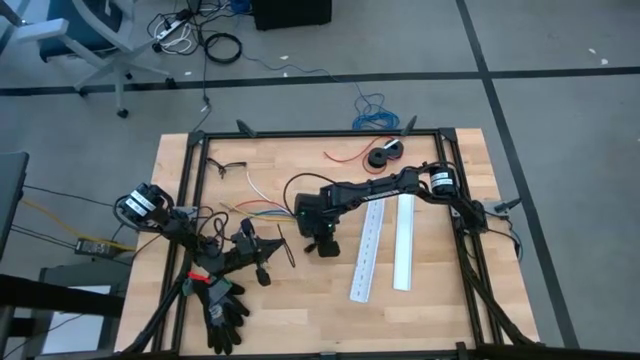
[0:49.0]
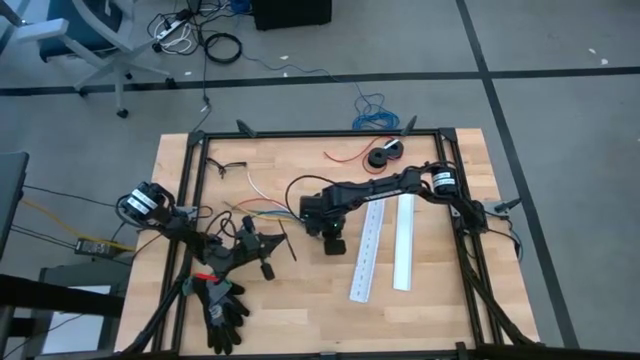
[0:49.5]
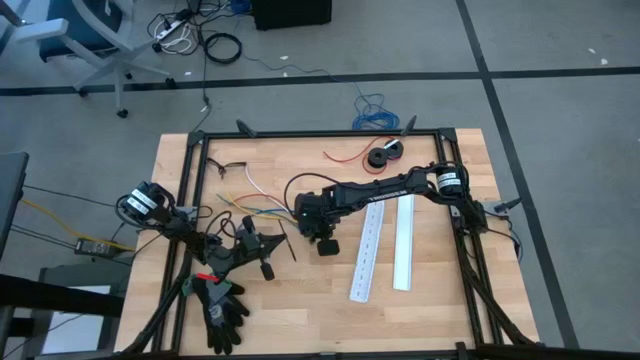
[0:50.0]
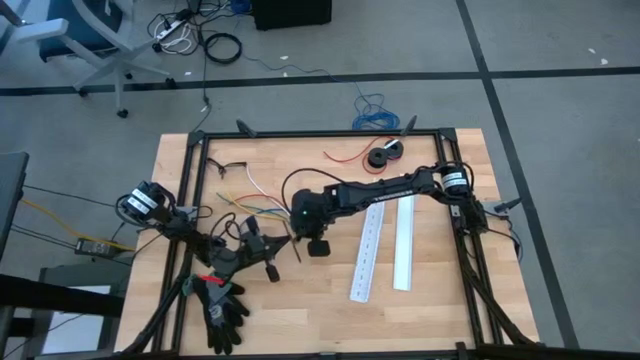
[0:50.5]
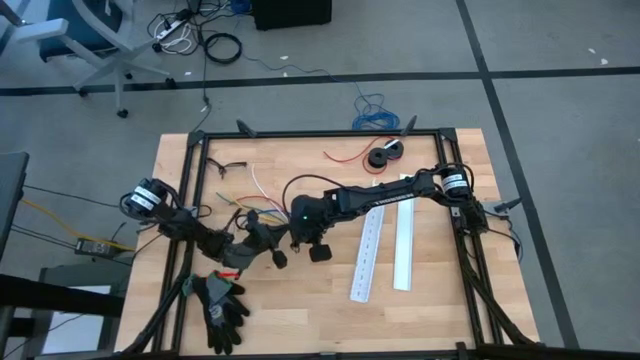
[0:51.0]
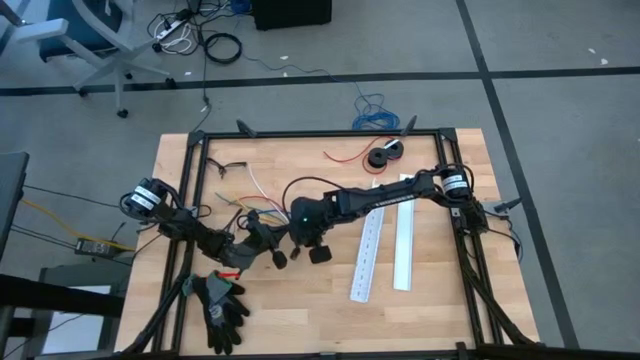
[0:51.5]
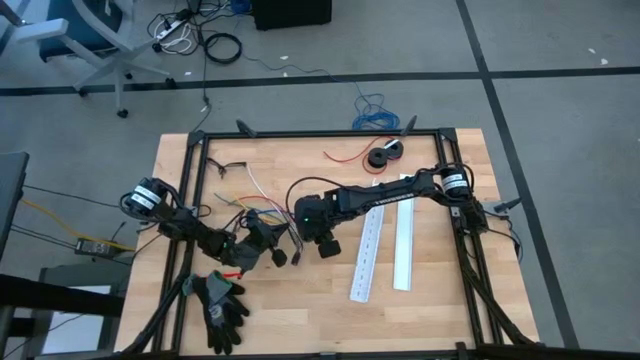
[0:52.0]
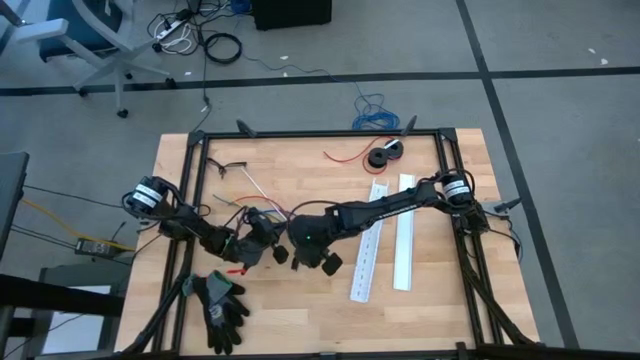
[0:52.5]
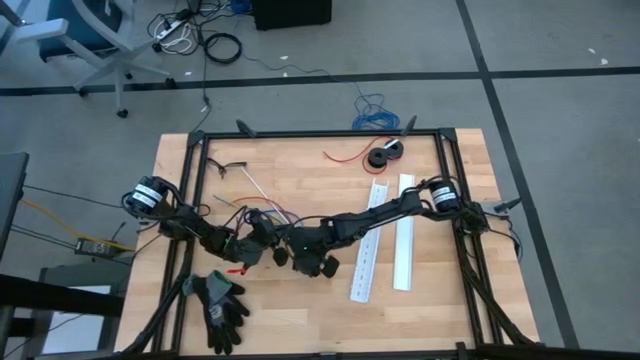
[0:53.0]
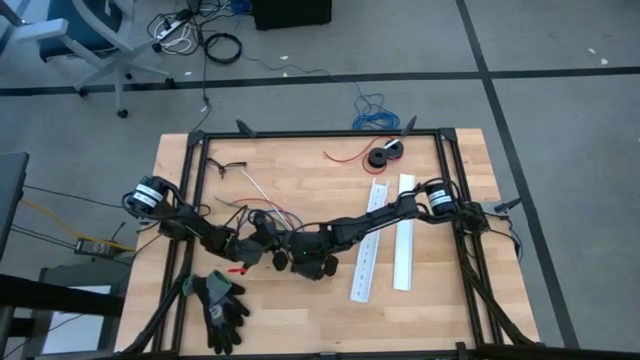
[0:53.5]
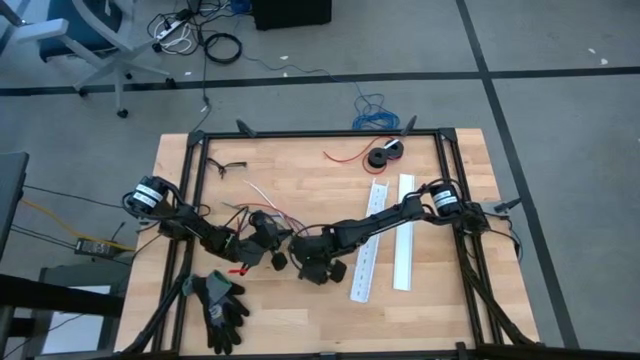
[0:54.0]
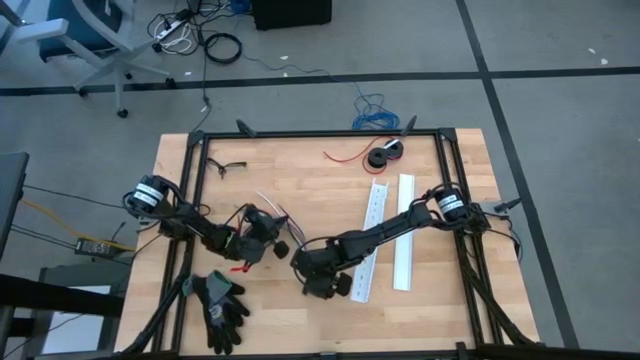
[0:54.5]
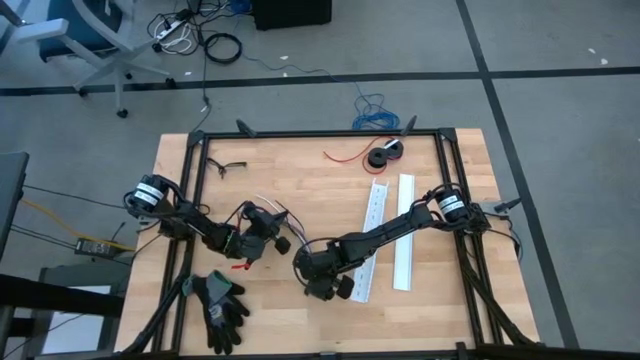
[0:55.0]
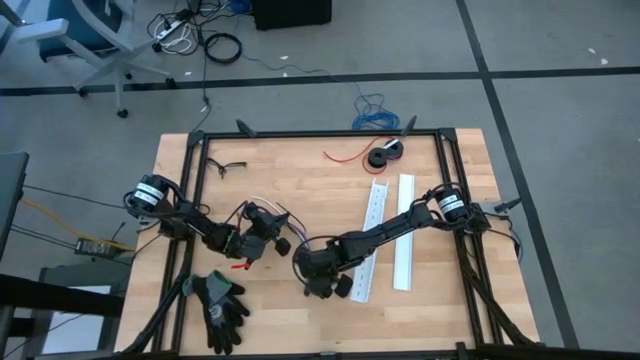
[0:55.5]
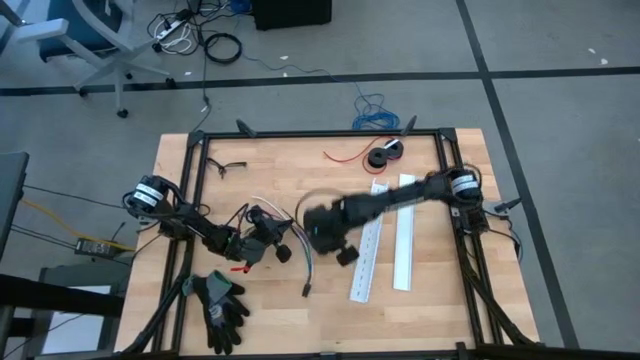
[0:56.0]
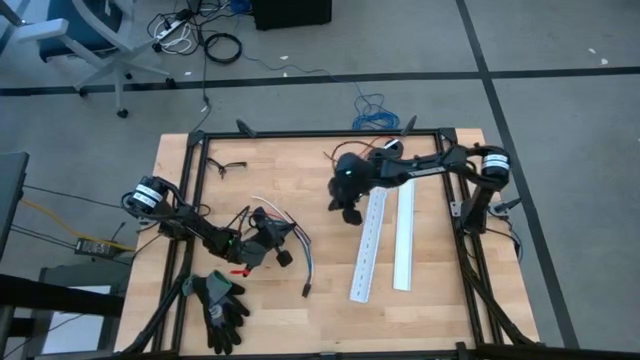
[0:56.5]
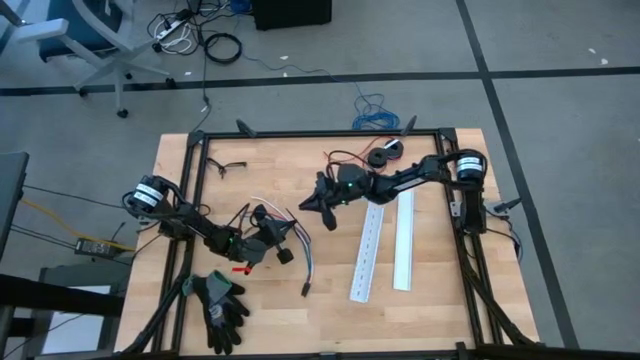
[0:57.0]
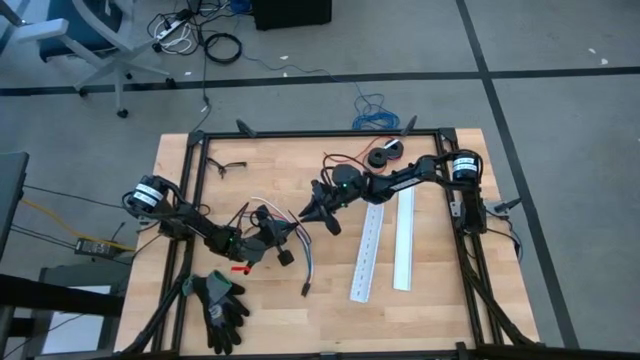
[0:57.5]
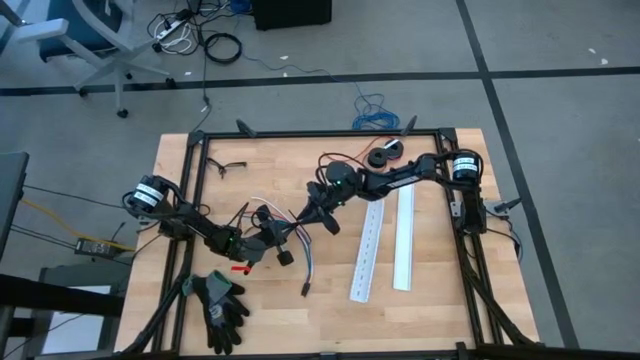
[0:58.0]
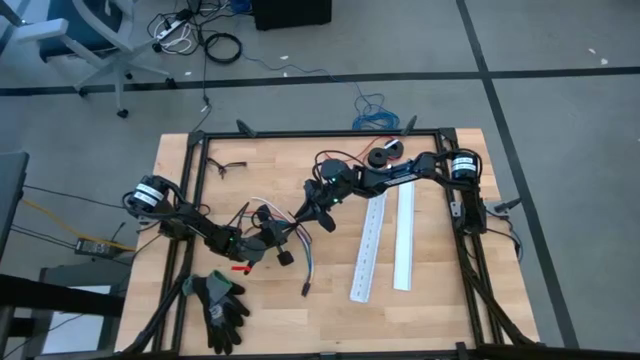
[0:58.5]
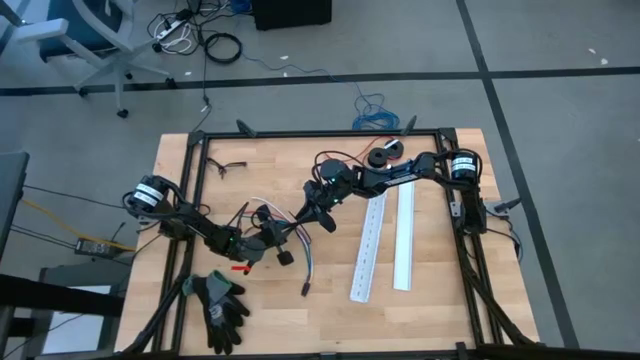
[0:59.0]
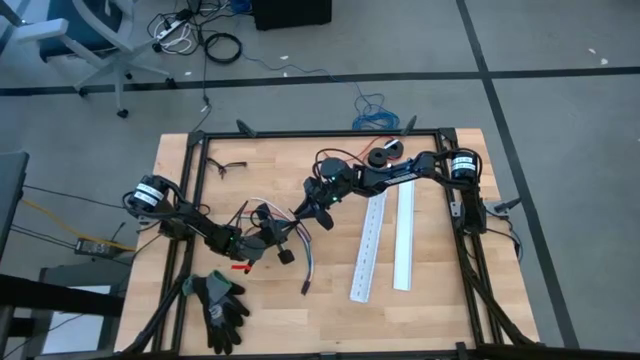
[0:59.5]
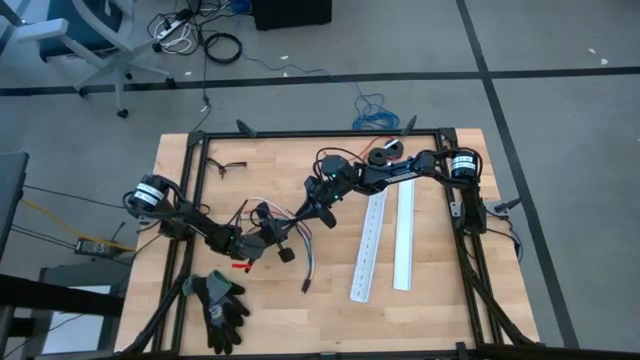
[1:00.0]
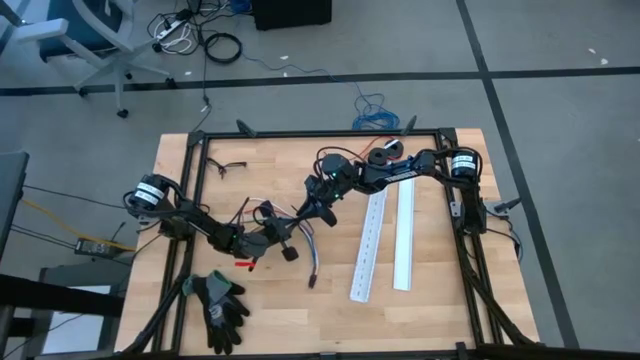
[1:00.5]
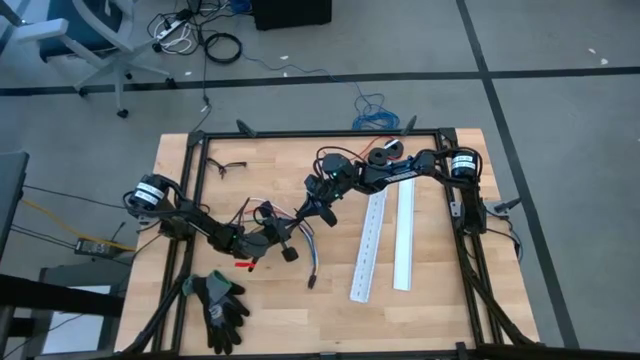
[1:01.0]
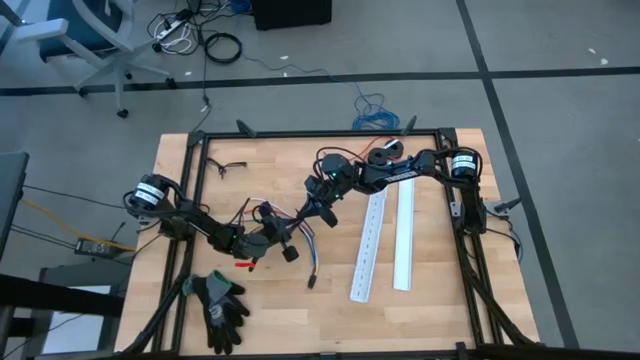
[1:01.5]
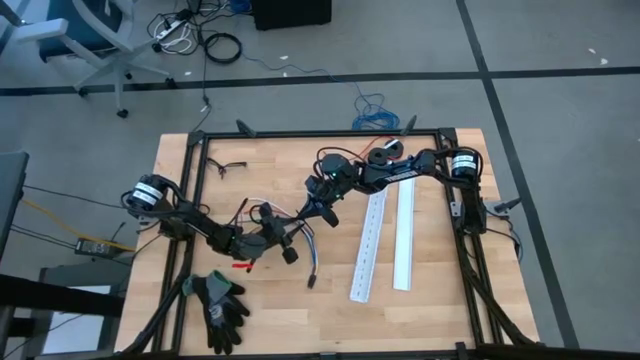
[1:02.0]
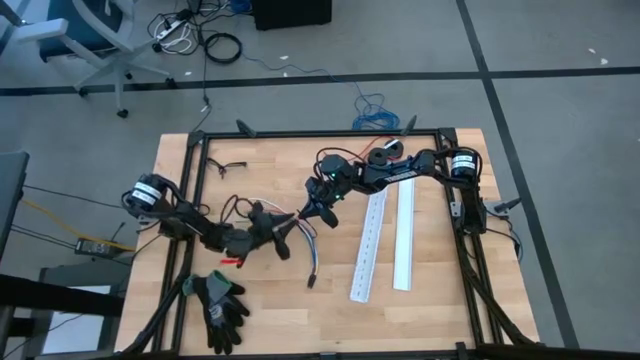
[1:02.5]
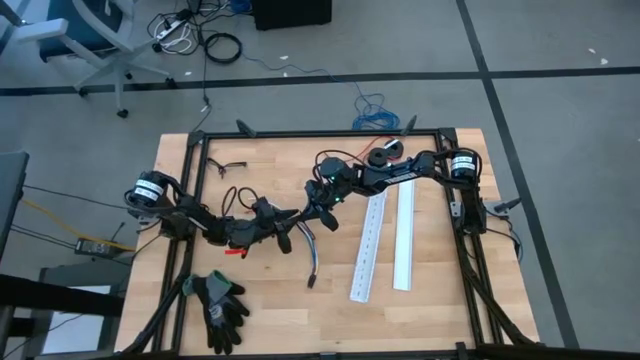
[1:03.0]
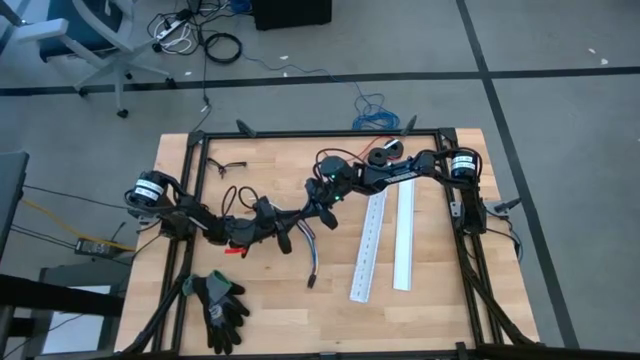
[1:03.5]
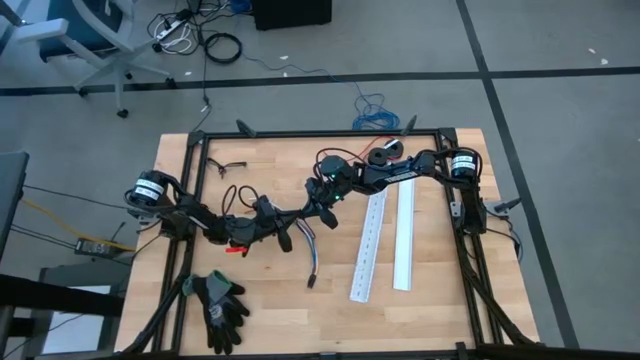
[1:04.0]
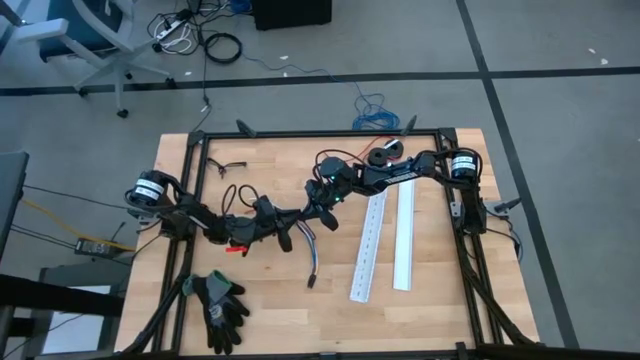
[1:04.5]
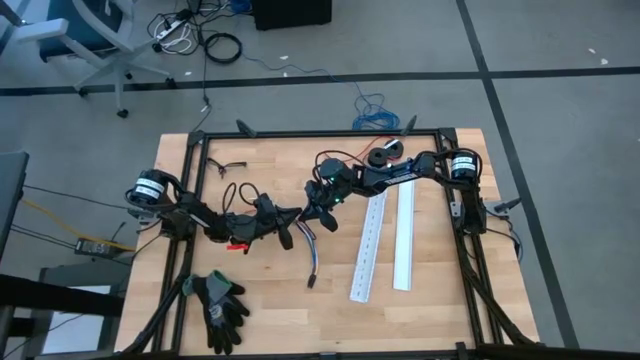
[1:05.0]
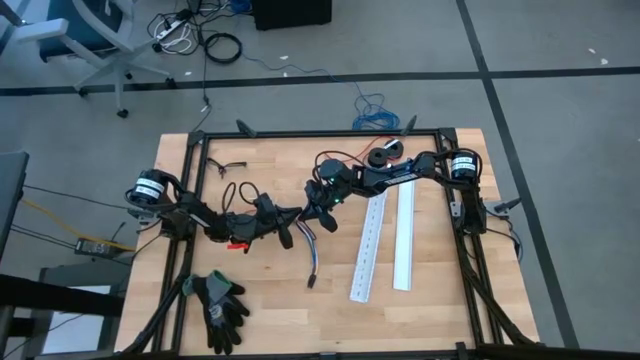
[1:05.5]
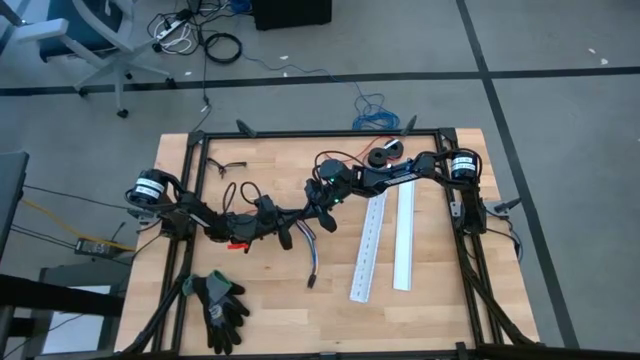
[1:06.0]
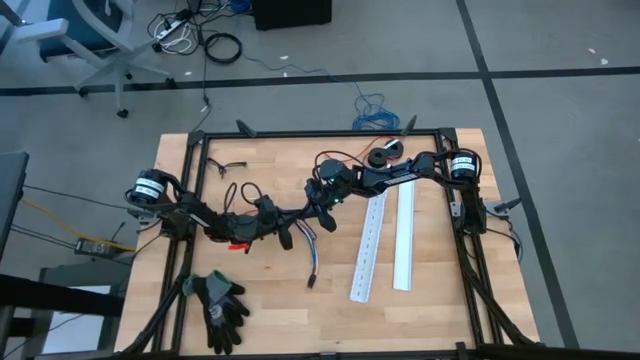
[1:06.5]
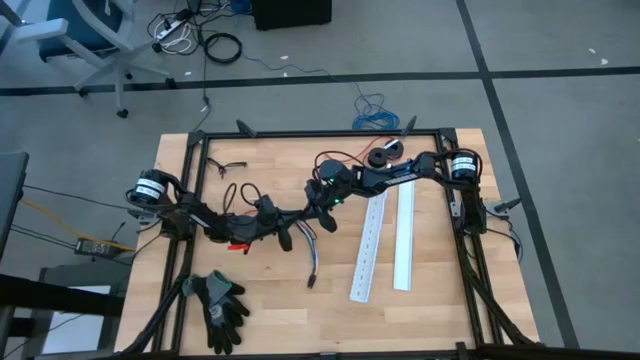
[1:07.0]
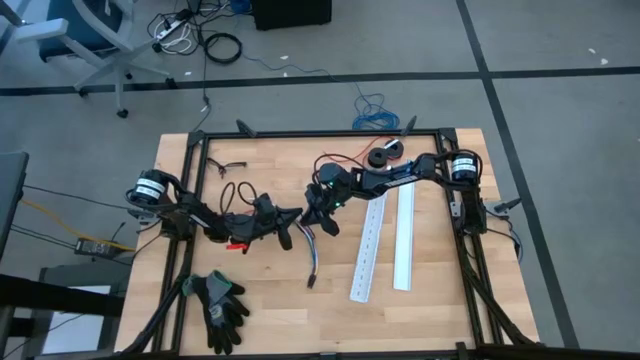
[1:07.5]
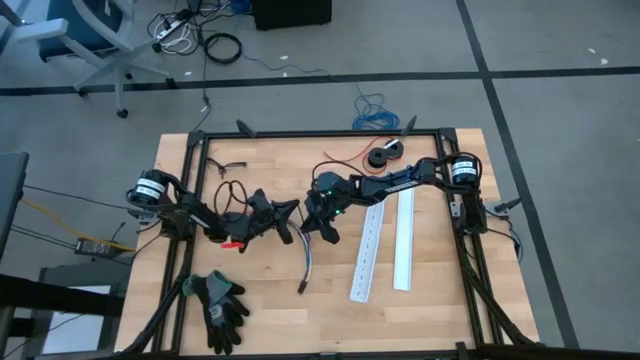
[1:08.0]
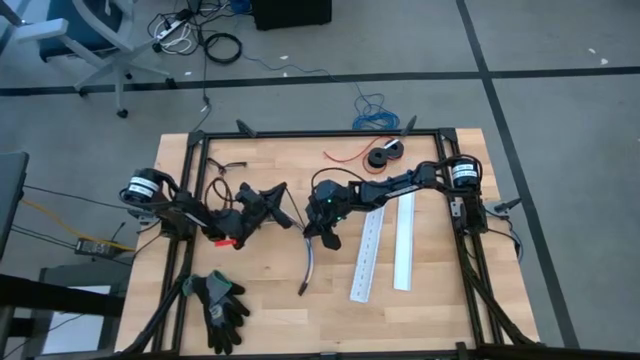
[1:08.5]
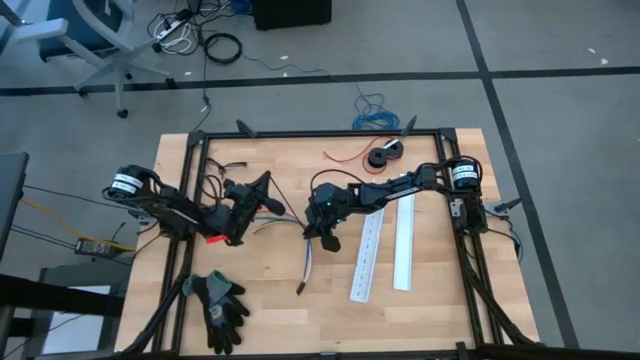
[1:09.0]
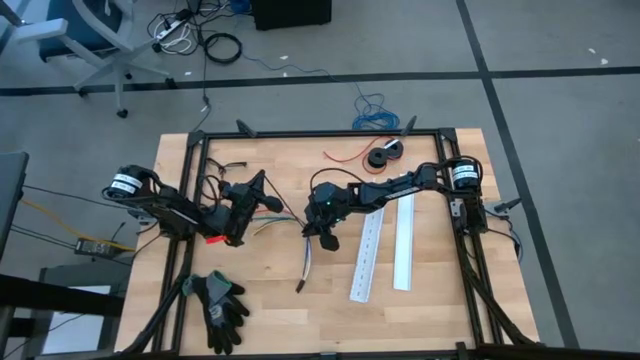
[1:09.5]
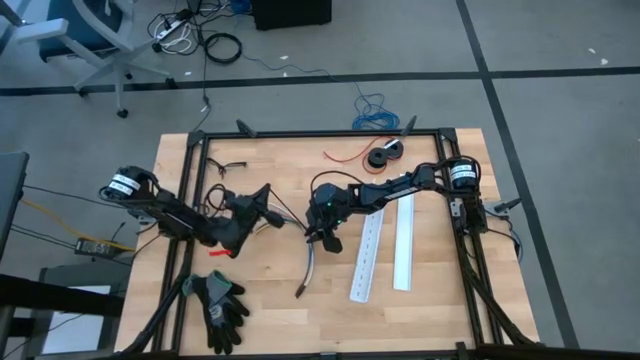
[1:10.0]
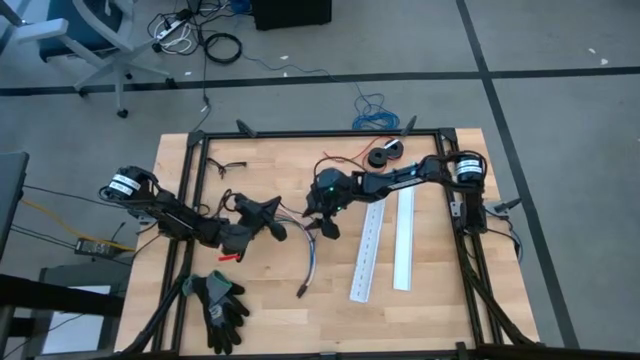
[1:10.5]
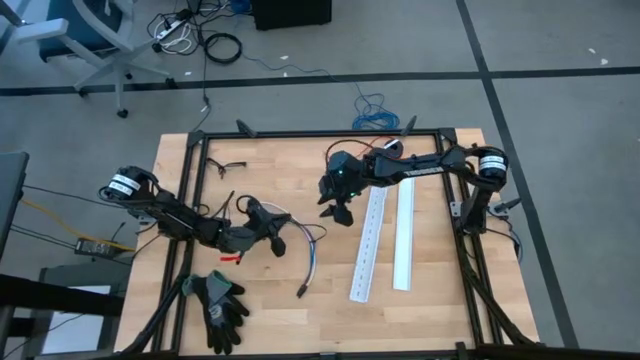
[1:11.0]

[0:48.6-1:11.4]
Task: Ziptie cables
Wrap the cable wires with the black zip tie
